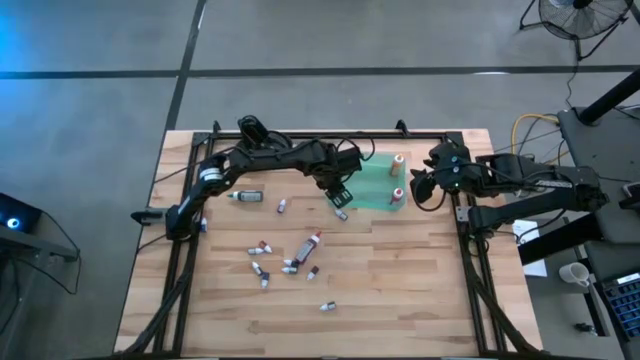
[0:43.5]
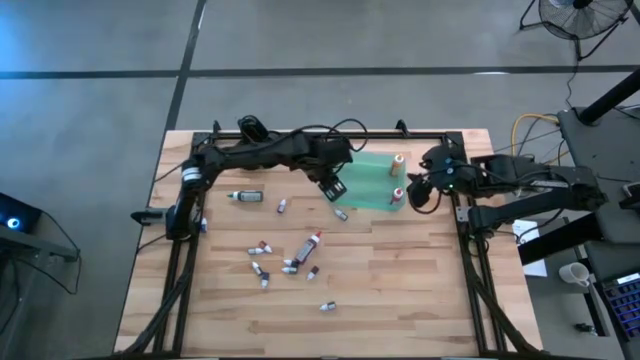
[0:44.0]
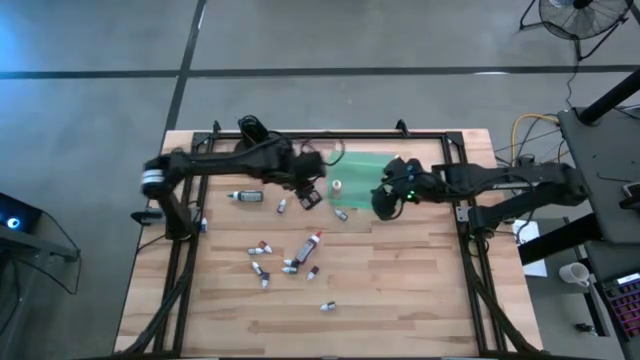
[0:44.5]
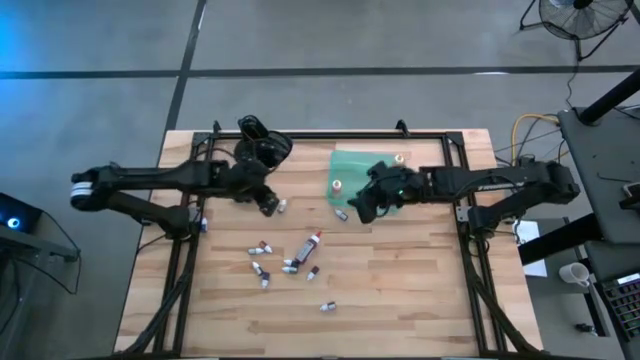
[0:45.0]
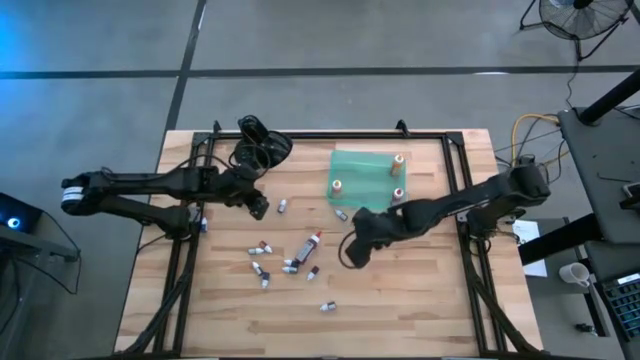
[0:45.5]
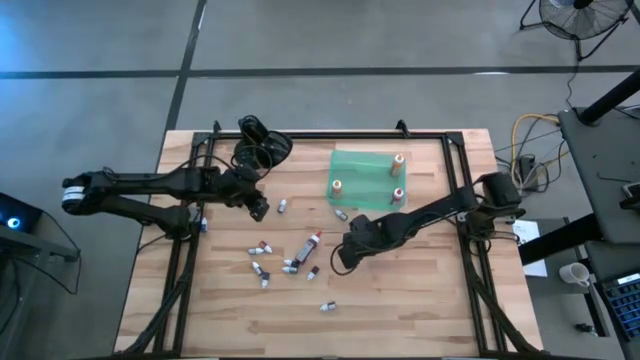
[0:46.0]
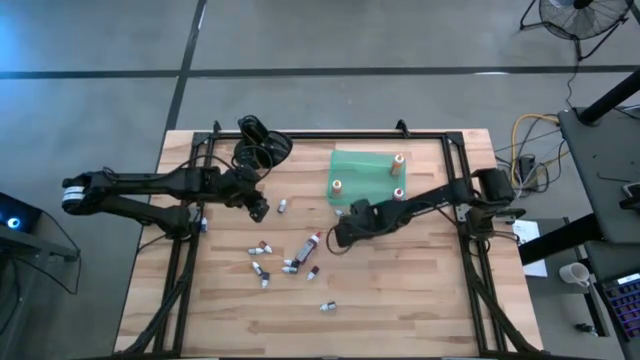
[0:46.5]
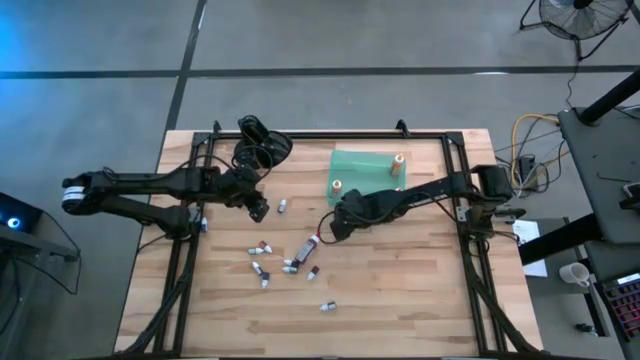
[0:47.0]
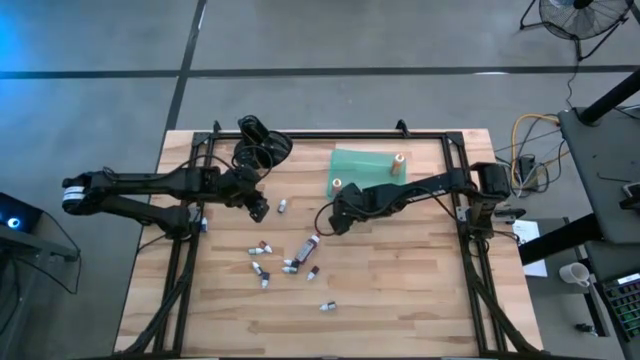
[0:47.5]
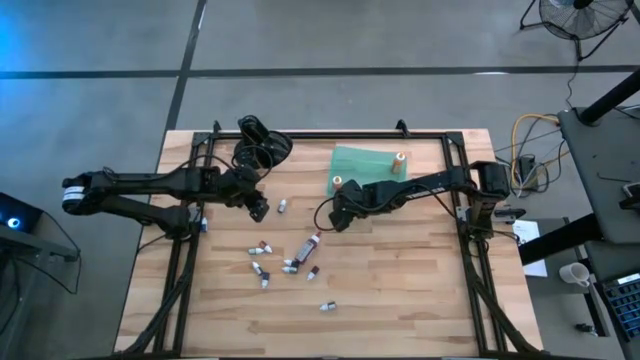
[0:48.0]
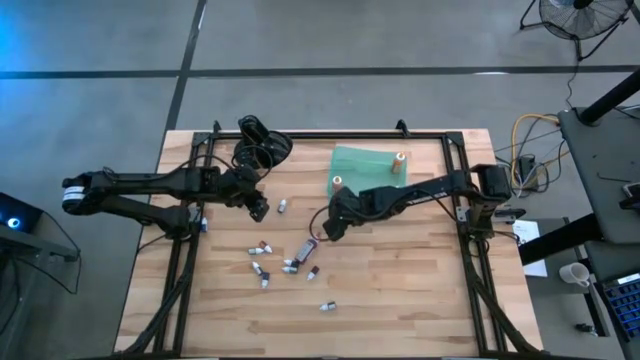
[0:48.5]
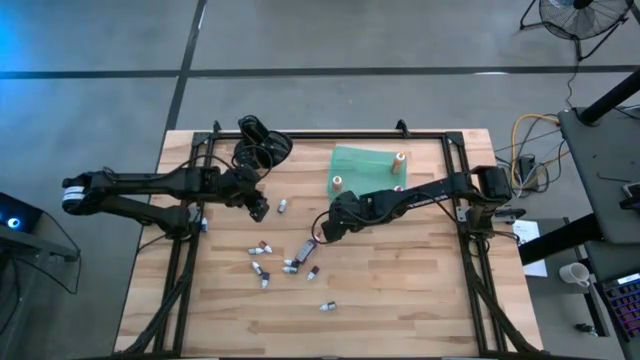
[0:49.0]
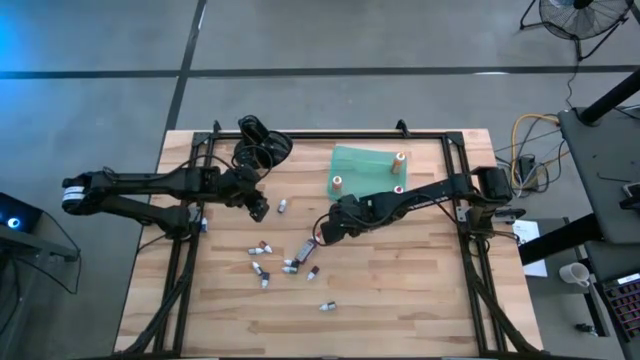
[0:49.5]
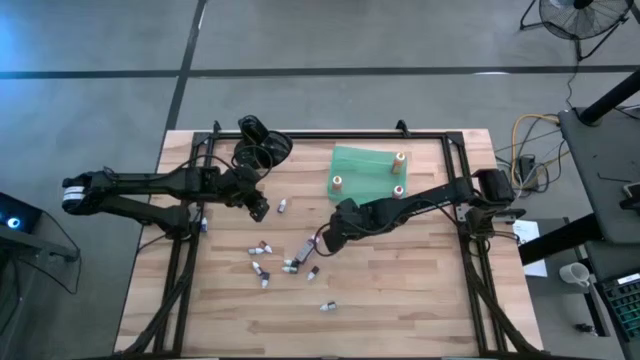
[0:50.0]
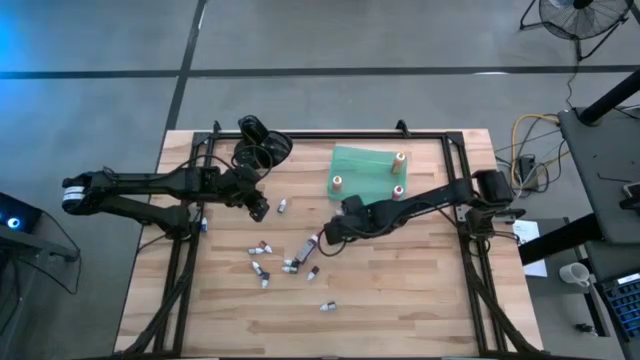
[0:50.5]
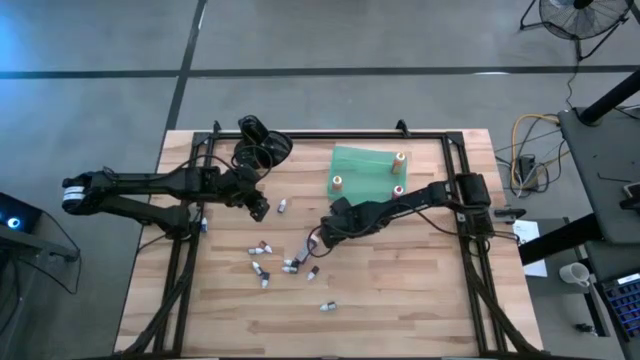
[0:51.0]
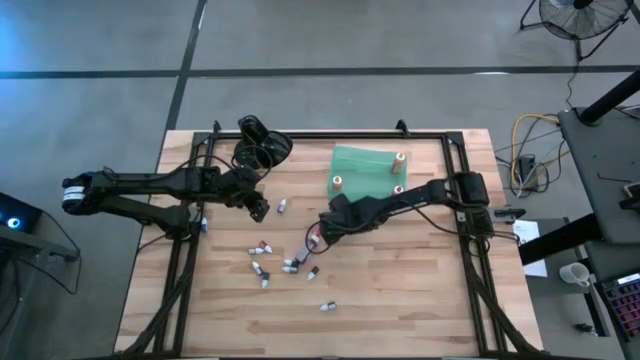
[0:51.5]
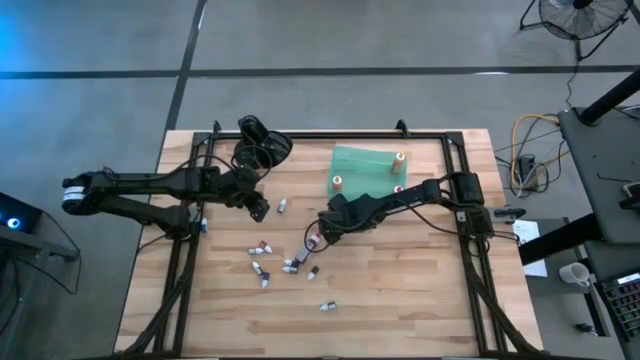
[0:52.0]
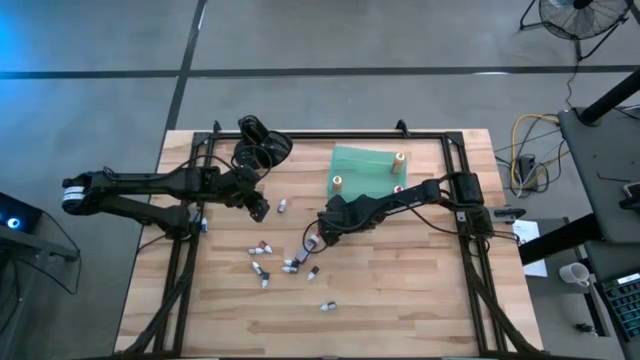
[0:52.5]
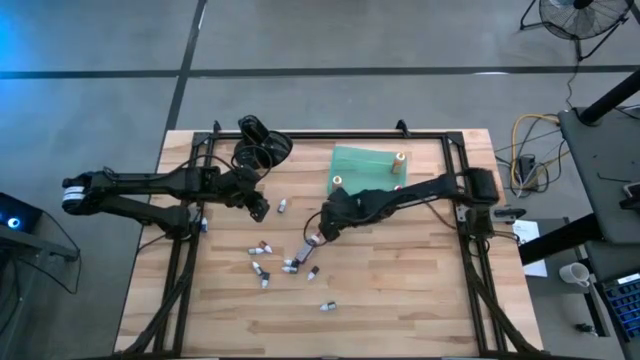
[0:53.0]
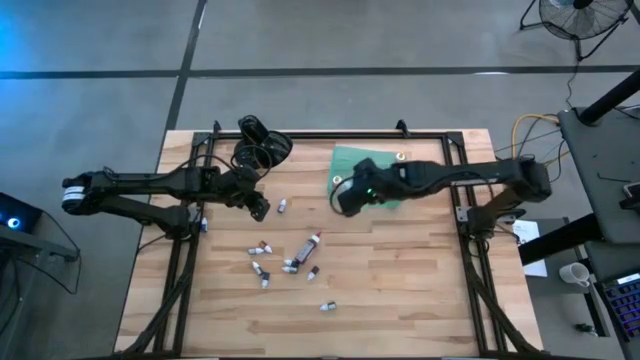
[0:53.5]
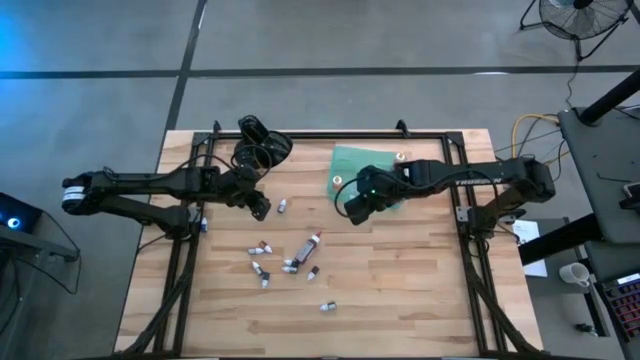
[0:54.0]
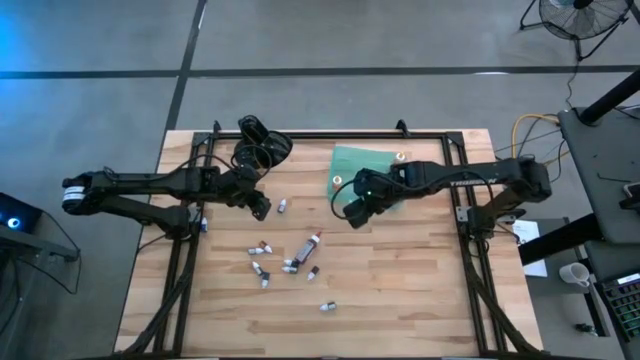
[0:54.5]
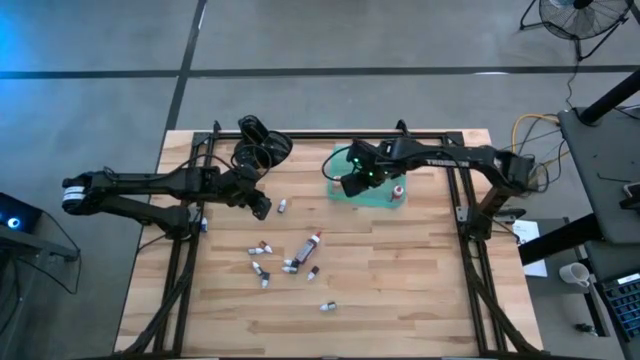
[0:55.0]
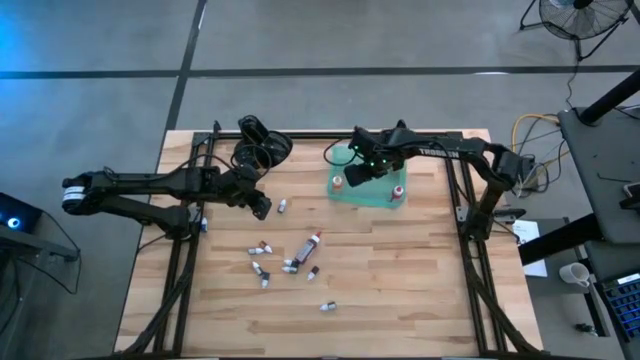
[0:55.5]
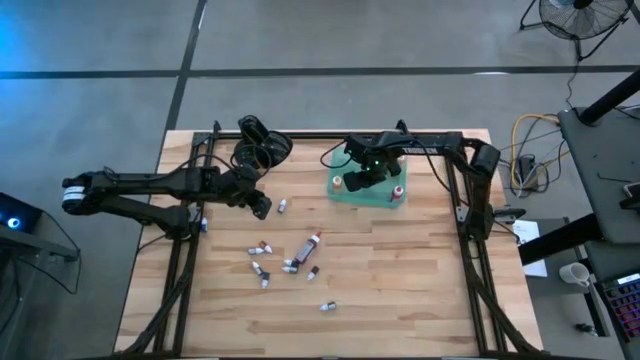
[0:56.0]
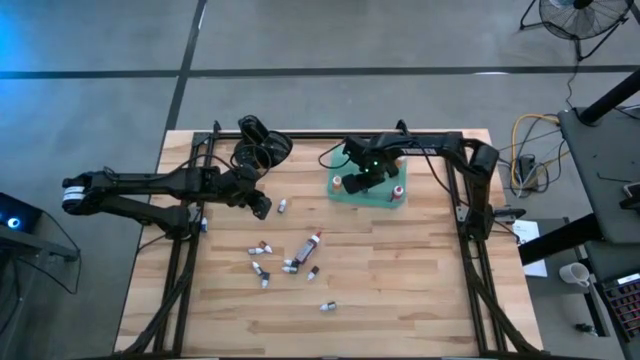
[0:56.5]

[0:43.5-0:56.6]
Task: Pick & Place food coloring
Put the red food coloring bottle into the green bin

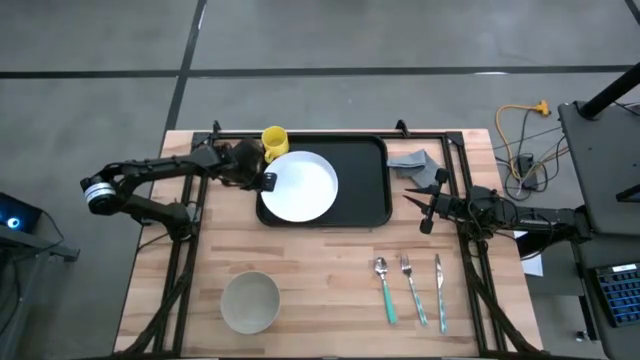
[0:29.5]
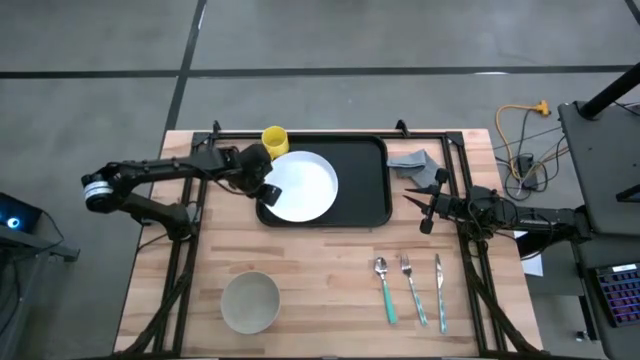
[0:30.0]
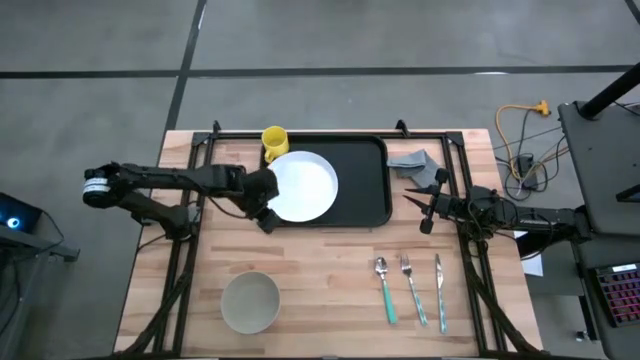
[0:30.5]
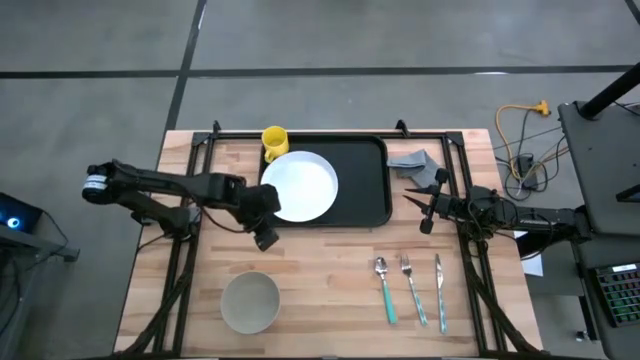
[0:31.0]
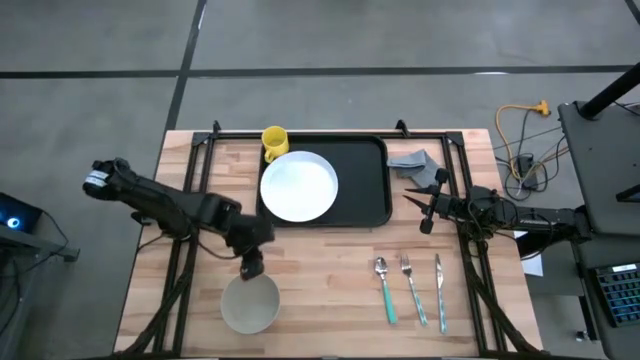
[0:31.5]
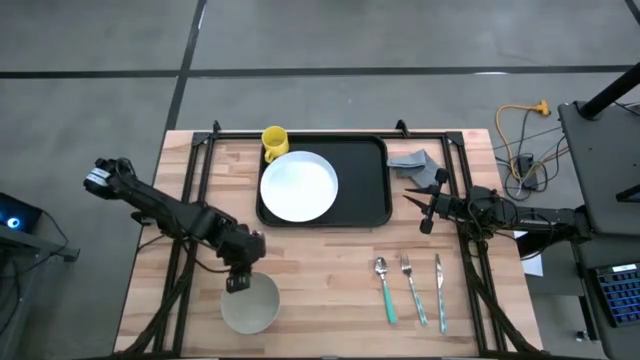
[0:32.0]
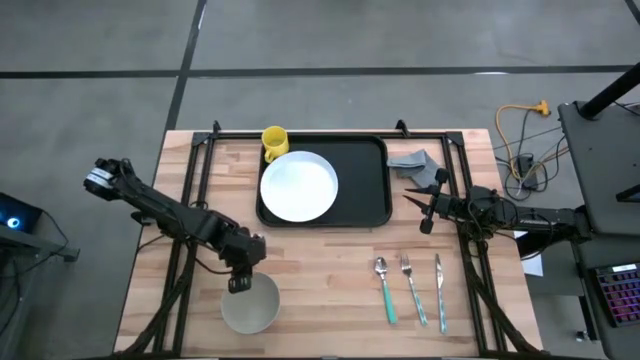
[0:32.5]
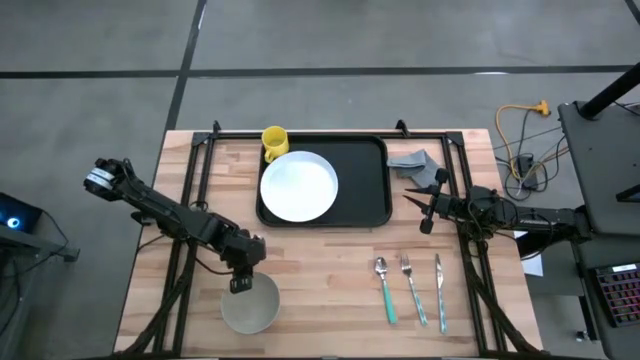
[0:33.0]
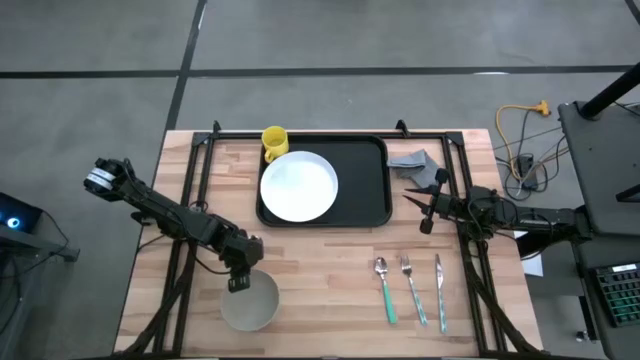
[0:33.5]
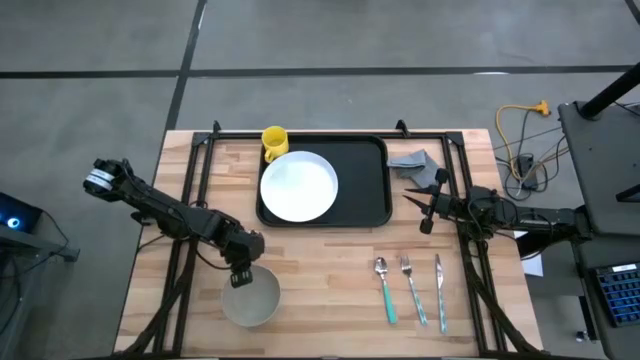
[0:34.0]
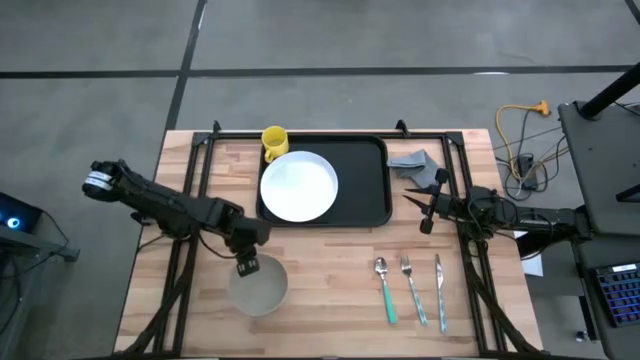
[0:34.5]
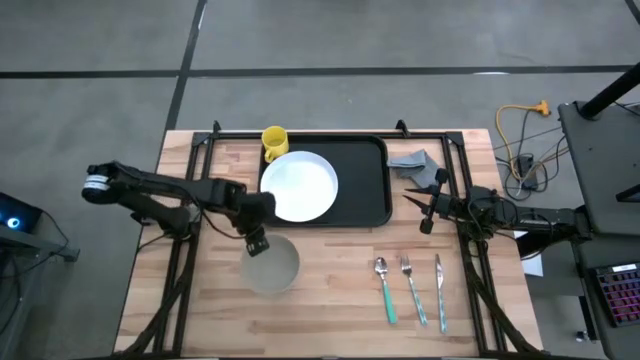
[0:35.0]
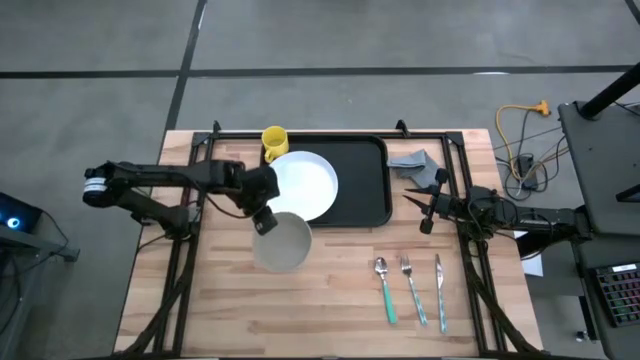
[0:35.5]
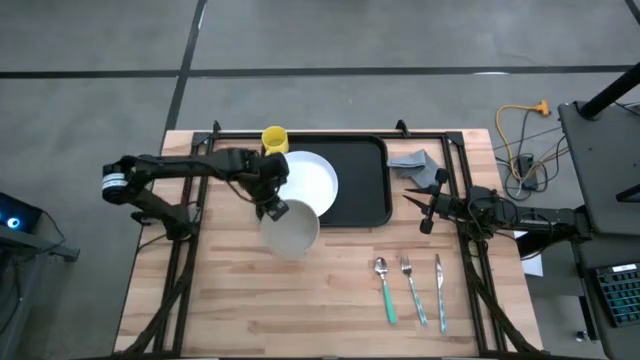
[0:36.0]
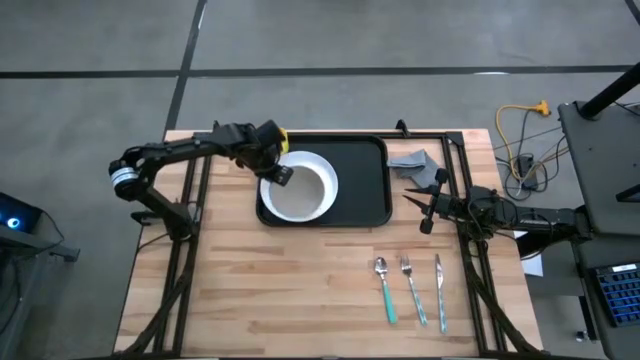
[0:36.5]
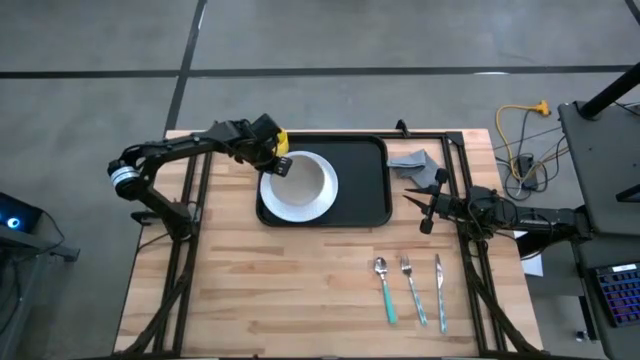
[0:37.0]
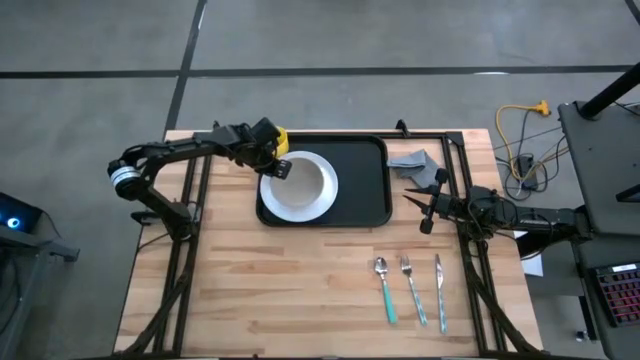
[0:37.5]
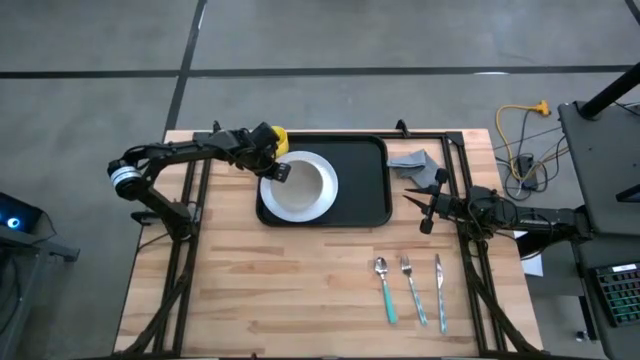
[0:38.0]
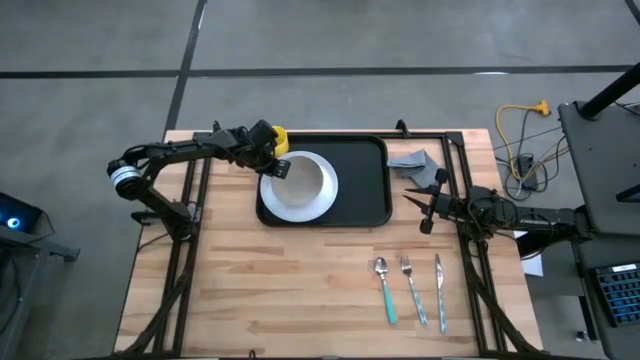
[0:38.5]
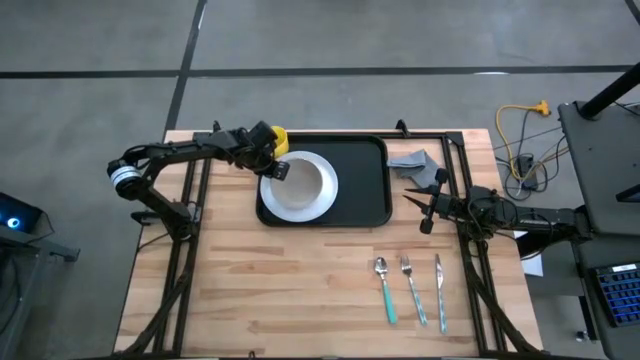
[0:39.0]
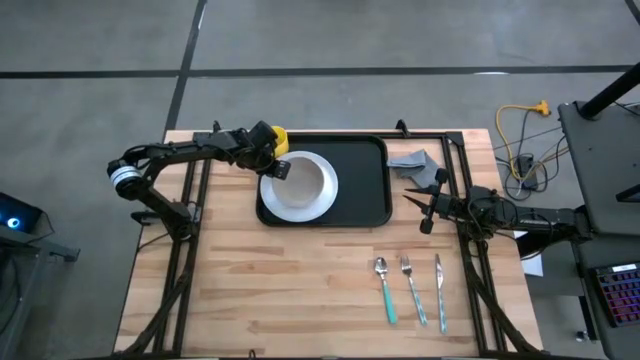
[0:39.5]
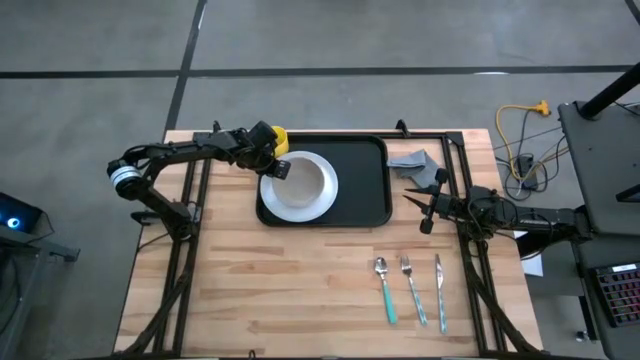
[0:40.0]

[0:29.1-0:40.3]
Task: Set up tray
Put the gray bowl on top of the white plate on the black serving tray
